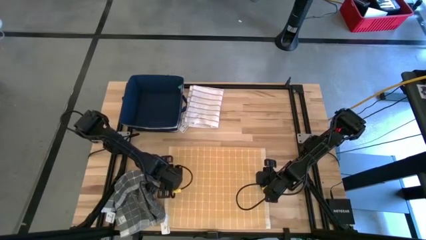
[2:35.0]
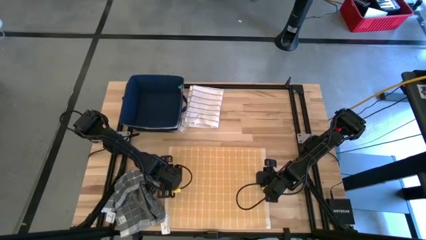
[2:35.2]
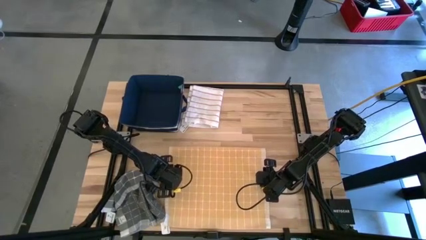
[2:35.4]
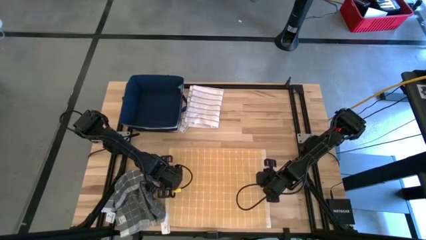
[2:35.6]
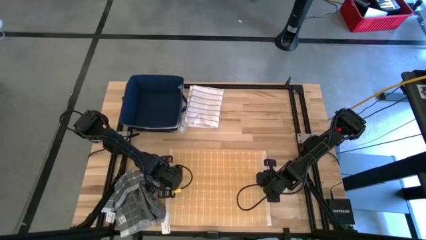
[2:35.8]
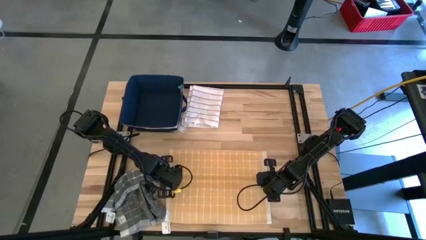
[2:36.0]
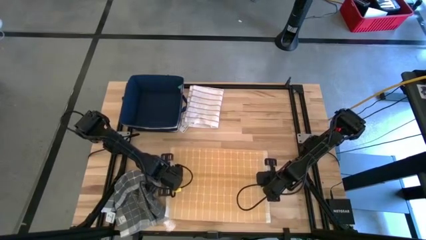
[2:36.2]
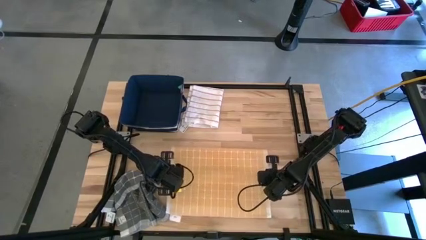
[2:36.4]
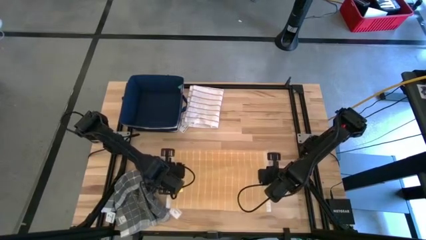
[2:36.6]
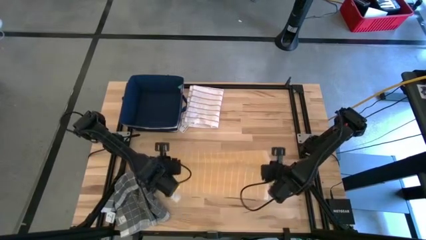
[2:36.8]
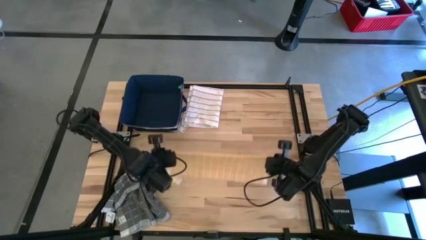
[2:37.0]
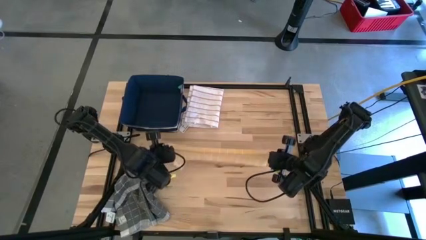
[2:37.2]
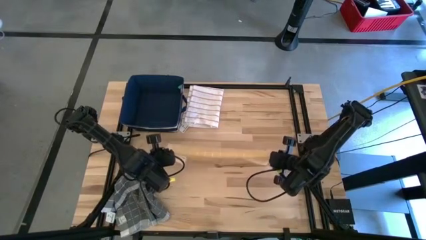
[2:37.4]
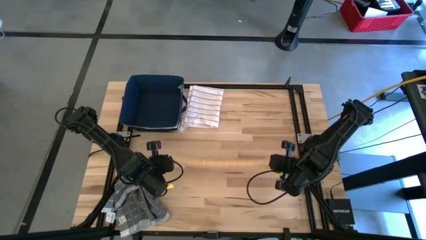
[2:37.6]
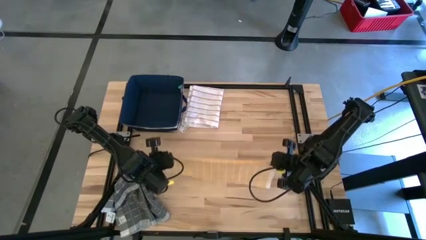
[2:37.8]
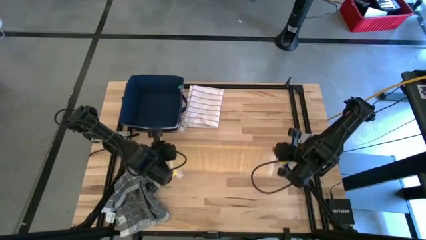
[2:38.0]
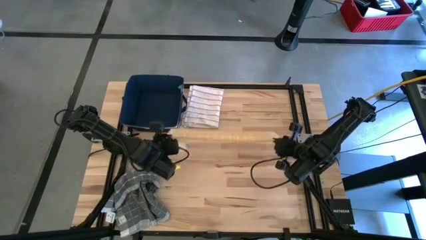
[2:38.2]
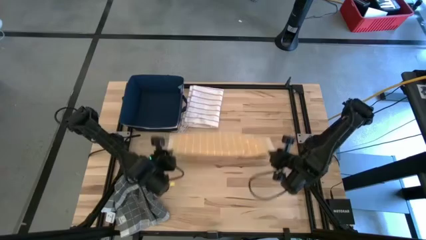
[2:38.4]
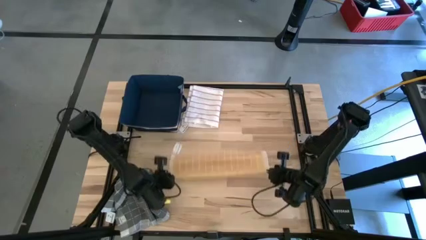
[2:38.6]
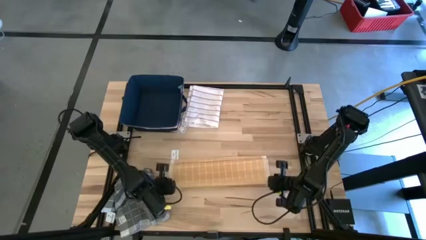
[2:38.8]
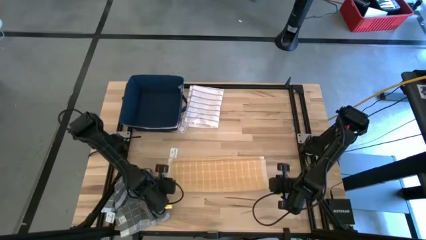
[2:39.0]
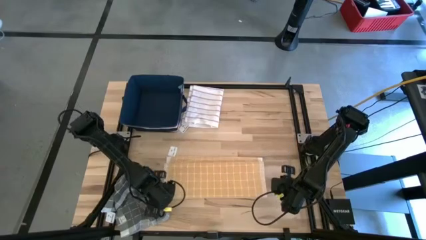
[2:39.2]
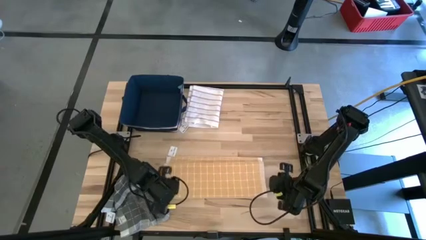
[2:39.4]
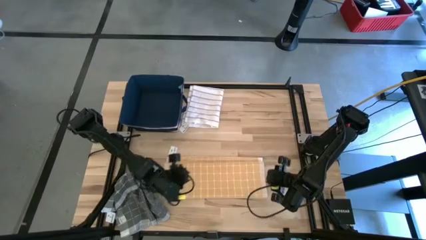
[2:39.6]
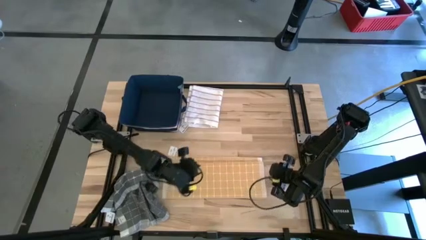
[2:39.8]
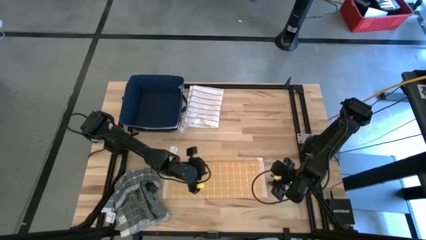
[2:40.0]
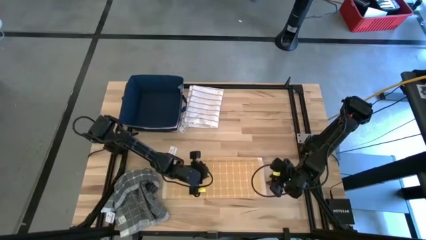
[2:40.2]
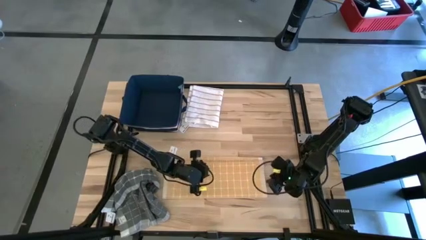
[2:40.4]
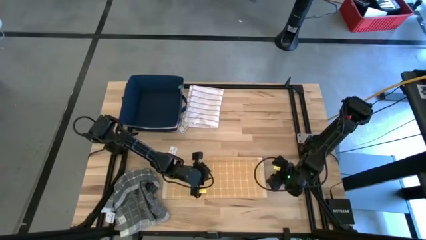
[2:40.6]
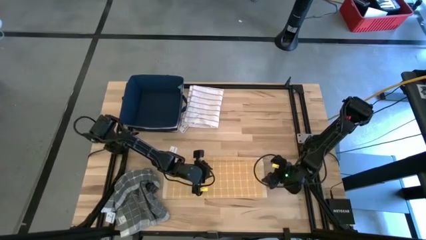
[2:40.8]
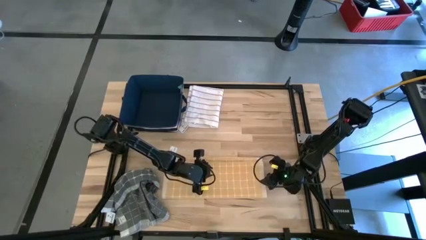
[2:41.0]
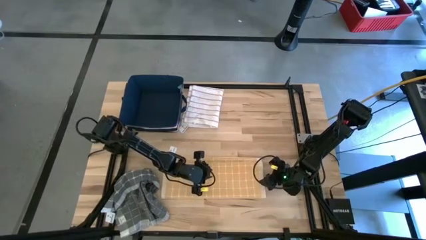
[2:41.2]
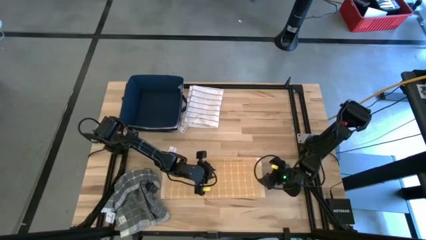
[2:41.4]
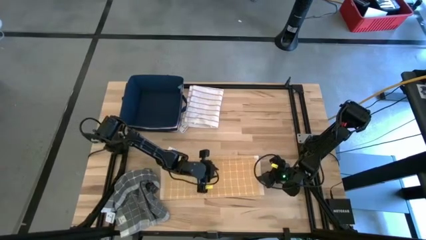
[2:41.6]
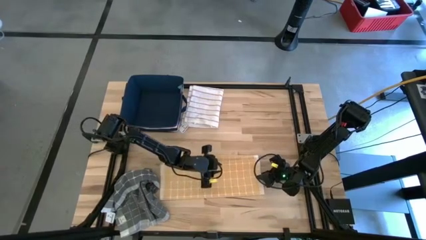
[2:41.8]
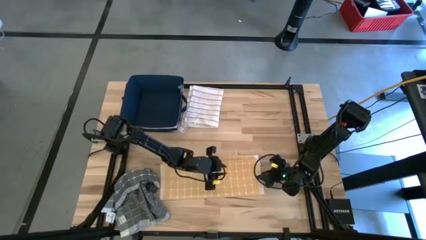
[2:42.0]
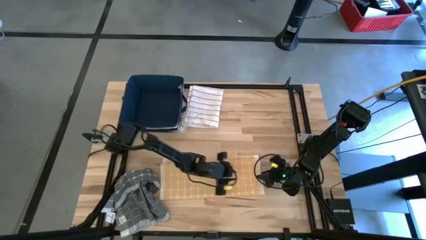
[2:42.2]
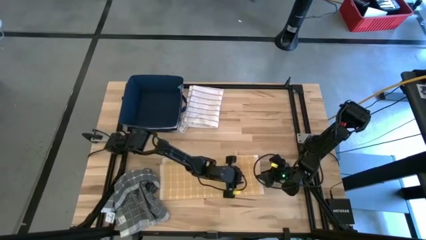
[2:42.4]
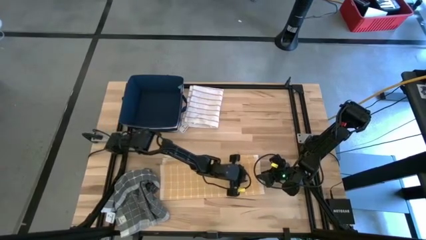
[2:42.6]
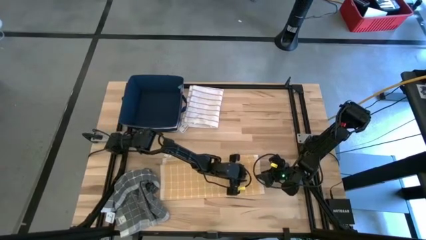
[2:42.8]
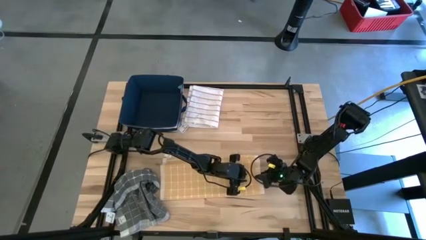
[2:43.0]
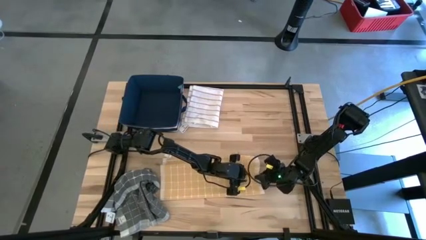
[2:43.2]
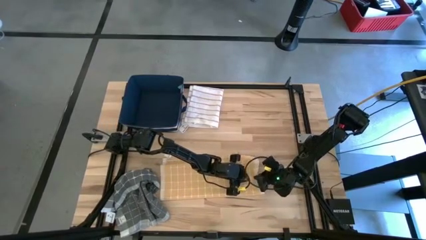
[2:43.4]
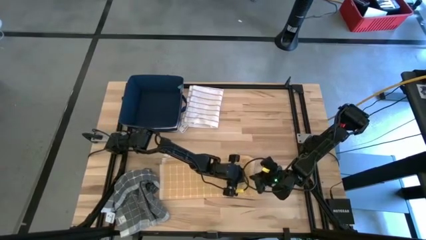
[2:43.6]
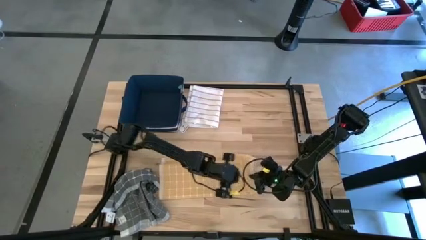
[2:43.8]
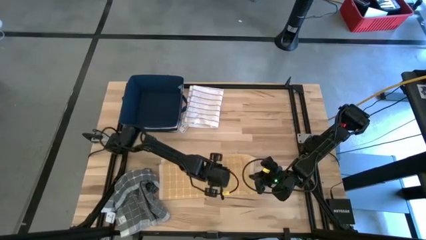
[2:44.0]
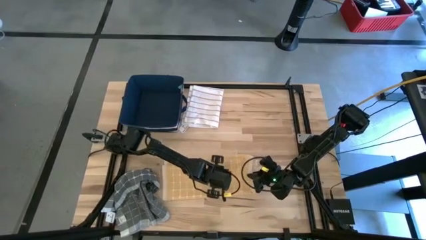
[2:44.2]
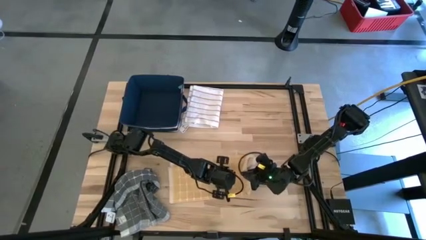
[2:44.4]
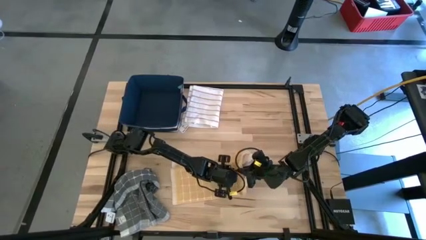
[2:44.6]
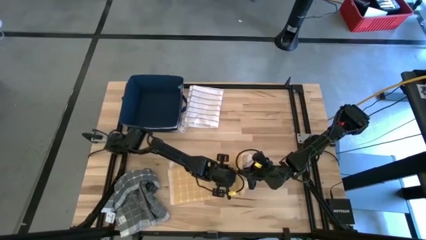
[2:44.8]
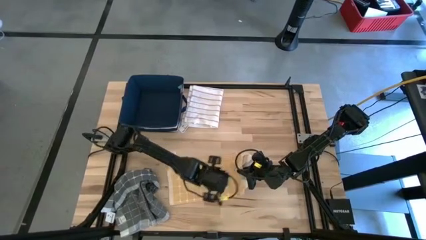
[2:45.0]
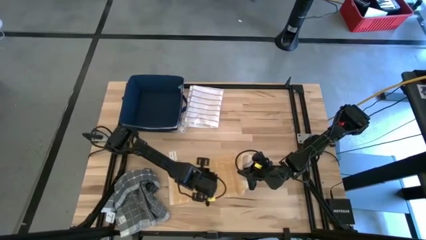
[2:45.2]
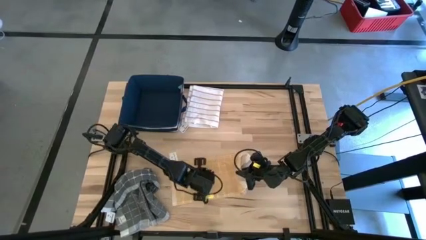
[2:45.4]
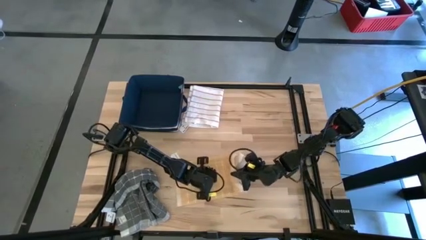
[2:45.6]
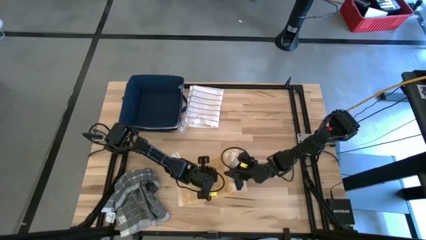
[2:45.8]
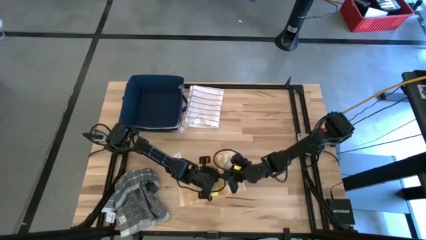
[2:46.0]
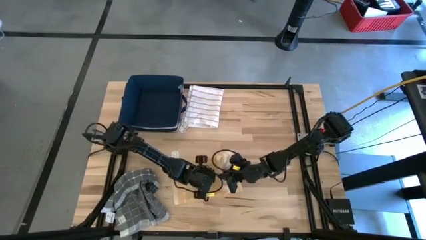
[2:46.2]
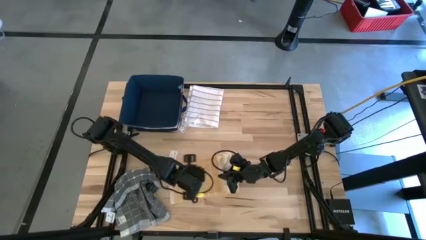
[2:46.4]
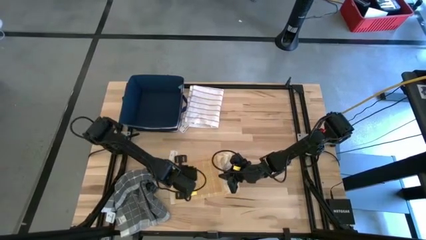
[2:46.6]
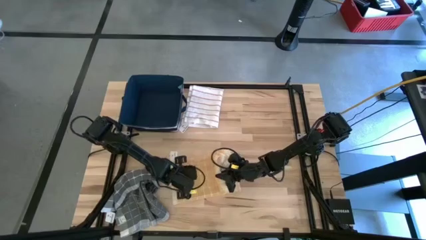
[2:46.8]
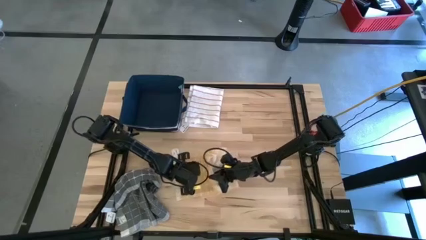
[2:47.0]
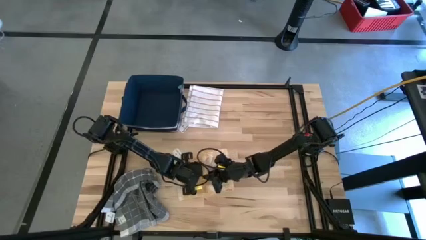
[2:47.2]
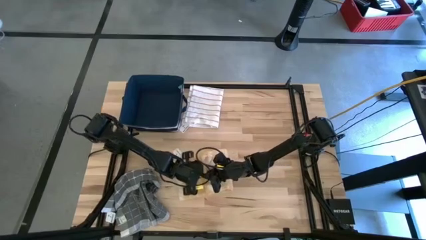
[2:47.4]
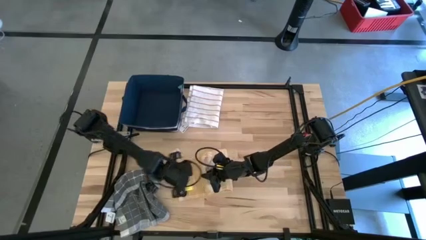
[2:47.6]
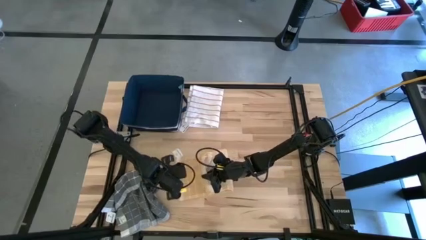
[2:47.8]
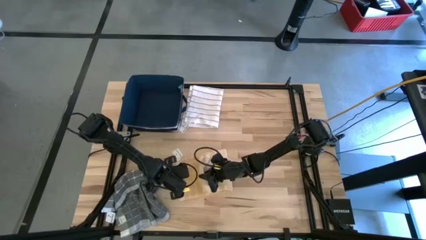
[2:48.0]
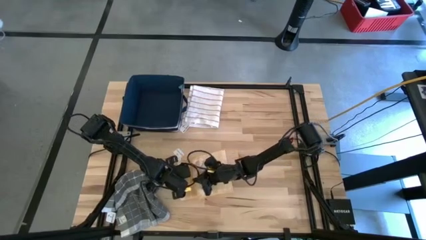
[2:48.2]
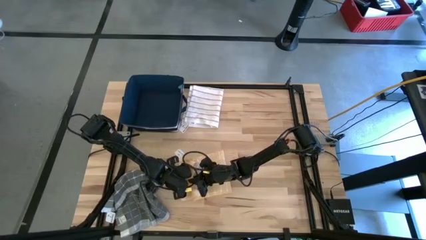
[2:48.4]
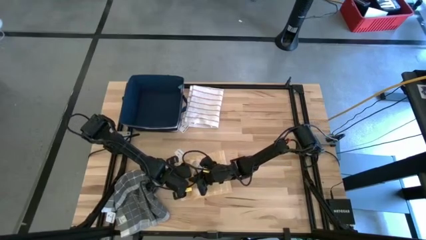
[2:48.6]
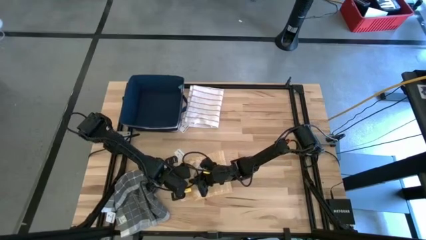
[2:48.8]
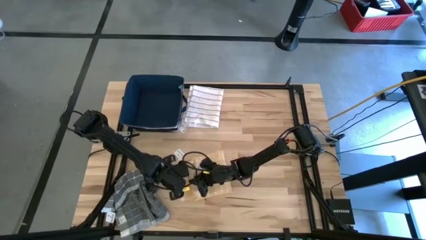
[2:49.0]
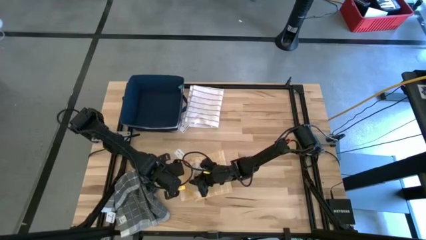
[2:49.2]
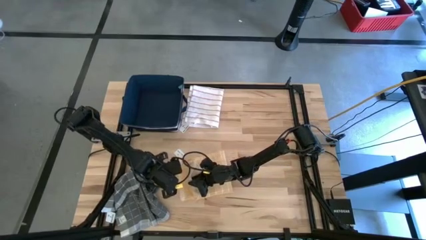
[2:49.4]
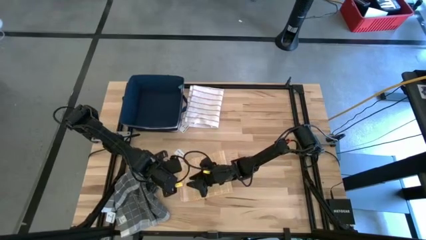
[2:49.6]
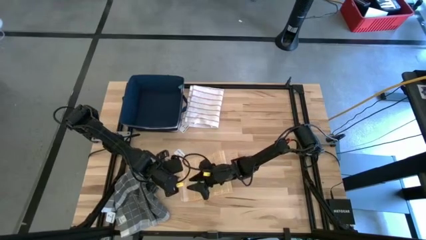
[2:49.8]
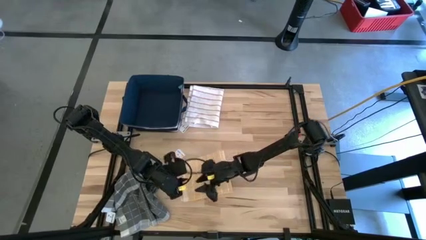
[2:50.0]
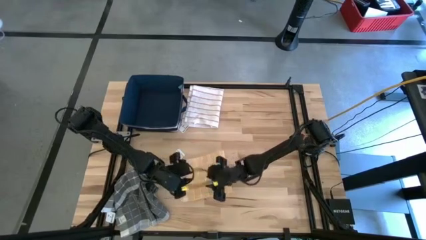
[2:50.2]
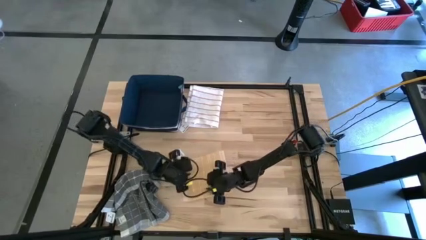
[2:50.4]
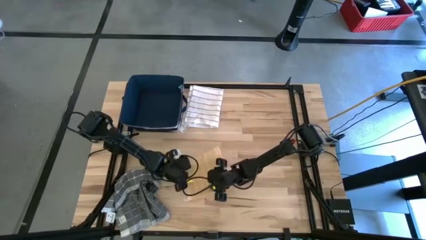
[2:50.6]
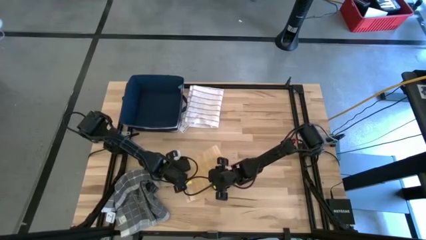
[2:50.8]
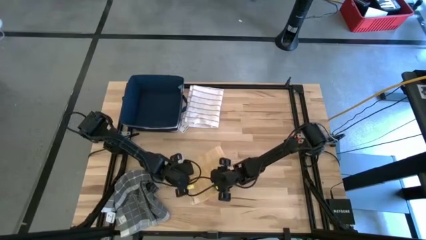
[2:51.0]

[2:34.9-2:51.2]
Task: Fold towel
Fold the orange towel

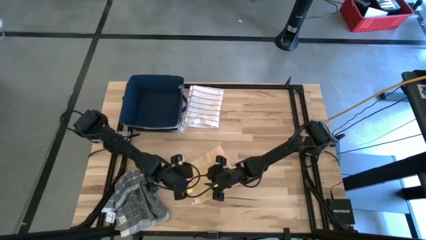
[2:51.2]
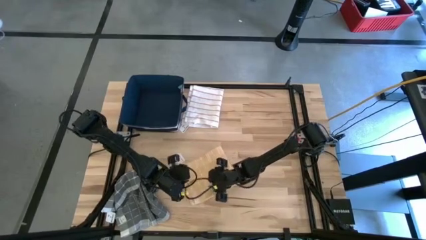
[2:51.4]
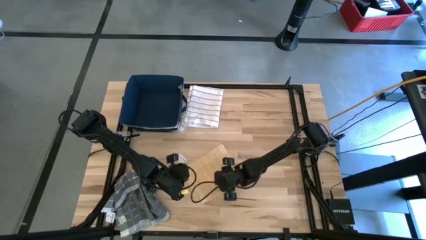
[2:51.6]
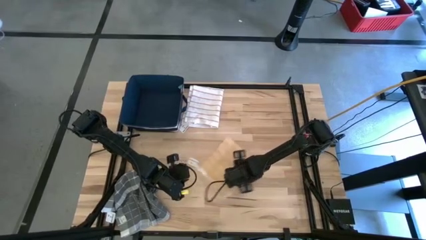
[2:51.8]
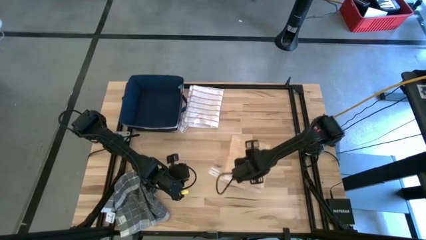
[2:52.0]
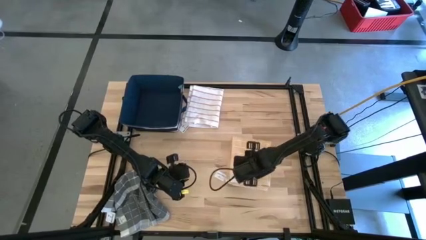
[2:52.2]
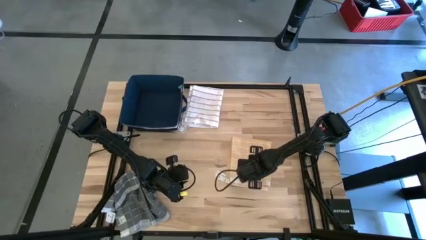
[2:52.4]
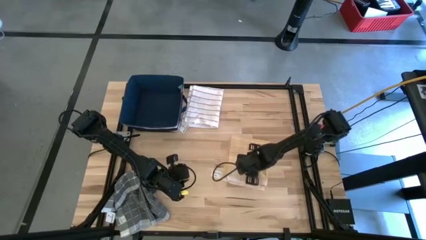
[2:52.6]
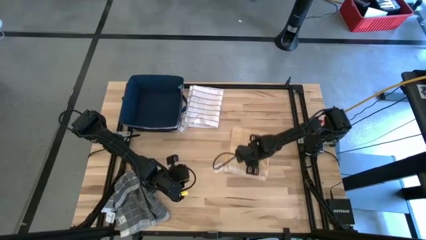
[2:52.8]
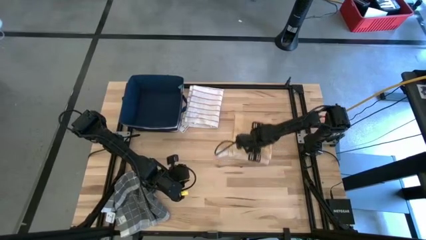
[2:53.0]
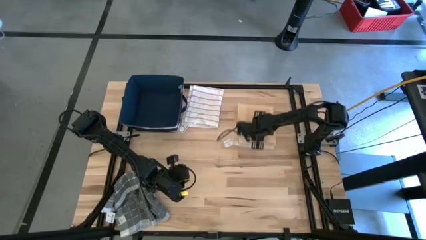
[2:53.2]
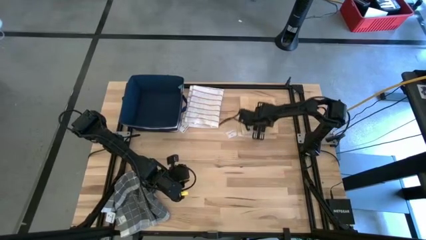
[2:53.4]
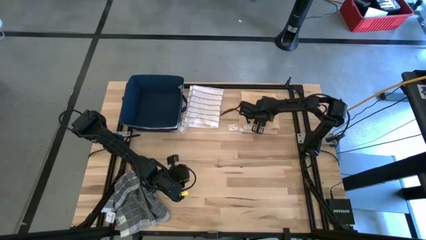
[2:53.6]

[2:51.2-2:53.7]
Move the orange towel to the top right of the table
